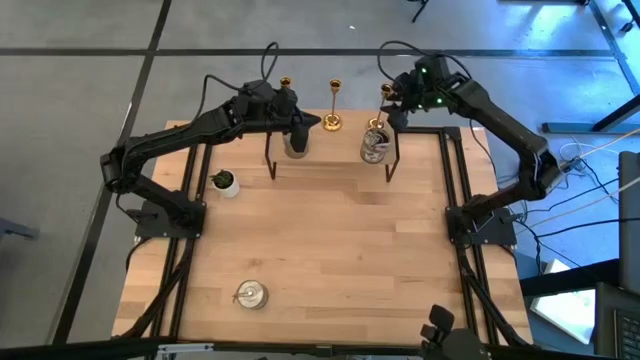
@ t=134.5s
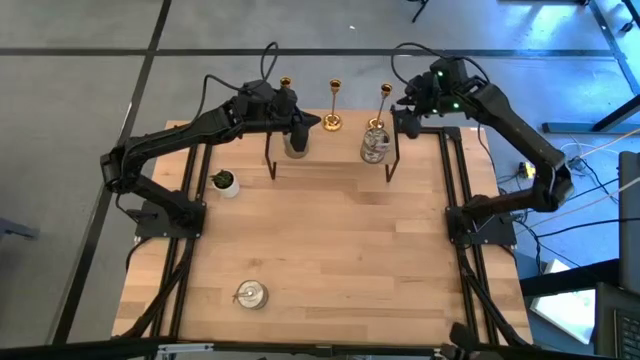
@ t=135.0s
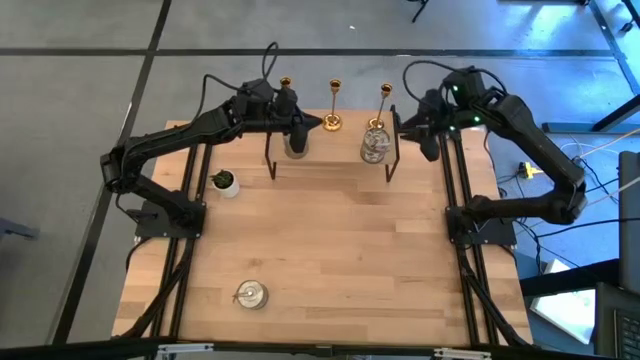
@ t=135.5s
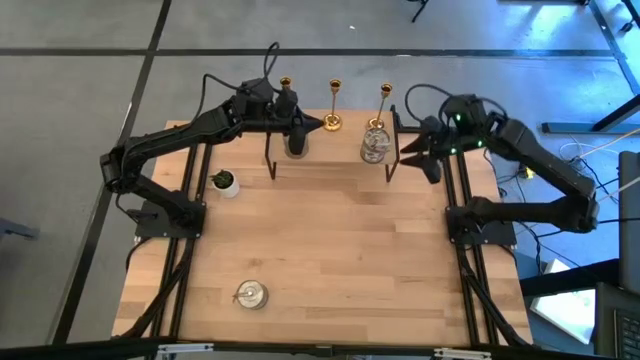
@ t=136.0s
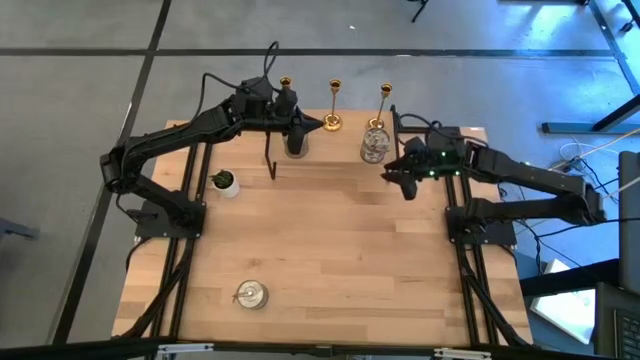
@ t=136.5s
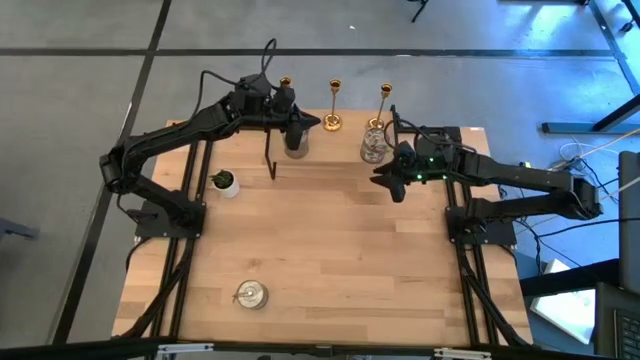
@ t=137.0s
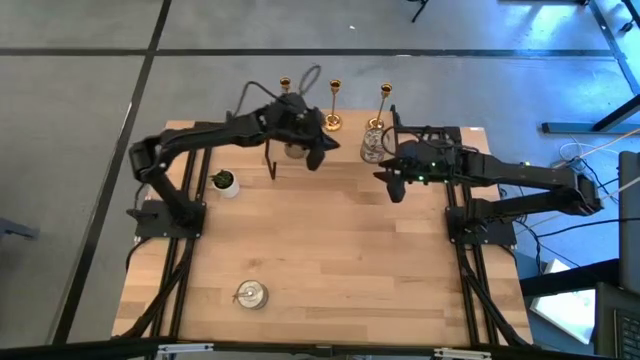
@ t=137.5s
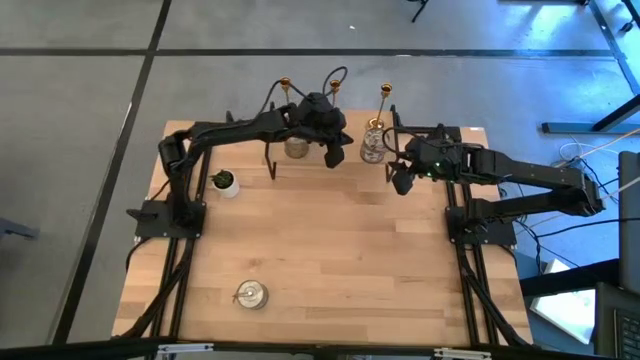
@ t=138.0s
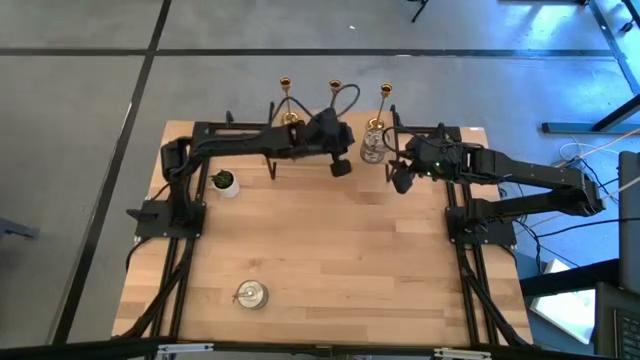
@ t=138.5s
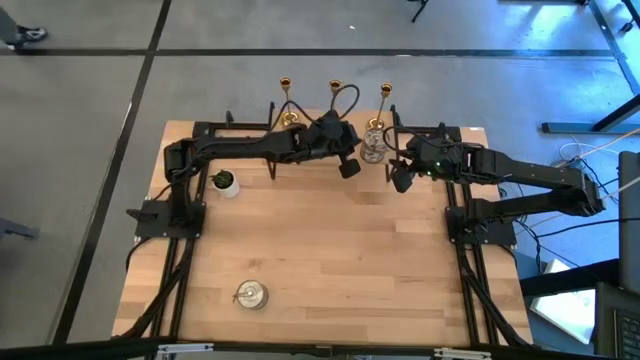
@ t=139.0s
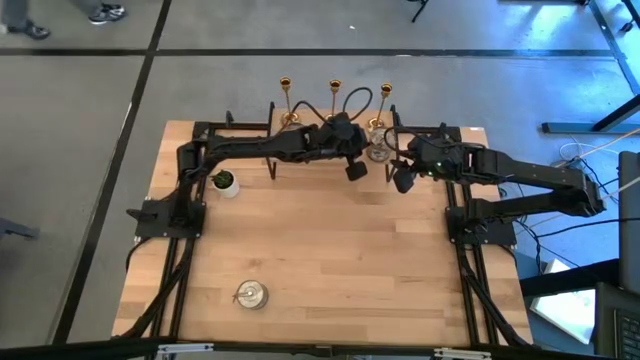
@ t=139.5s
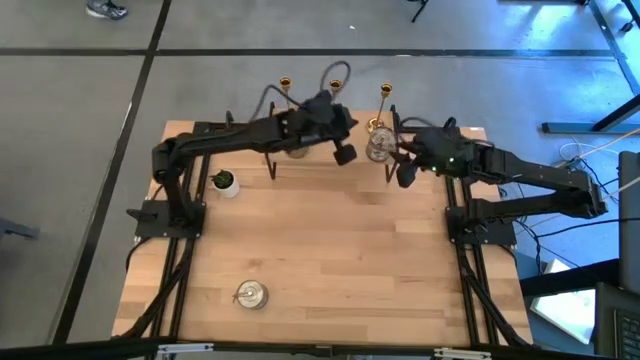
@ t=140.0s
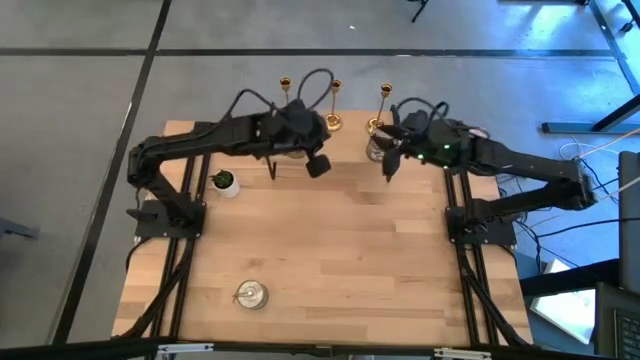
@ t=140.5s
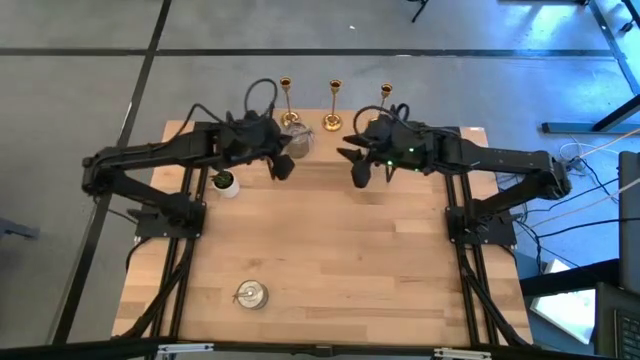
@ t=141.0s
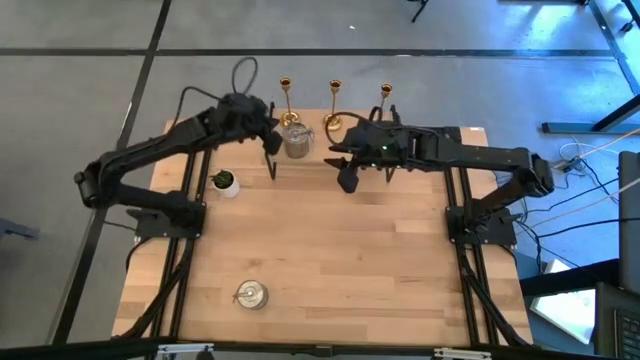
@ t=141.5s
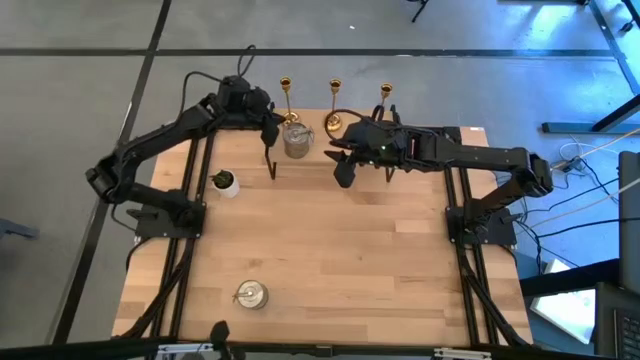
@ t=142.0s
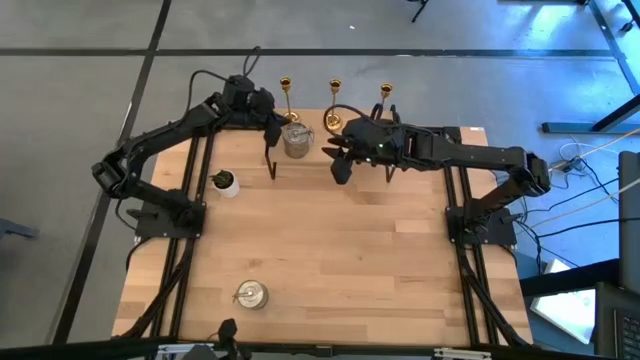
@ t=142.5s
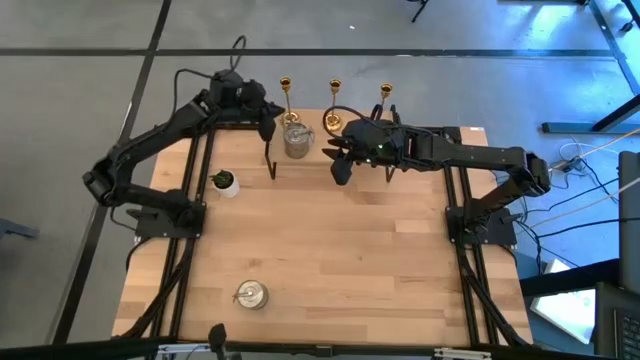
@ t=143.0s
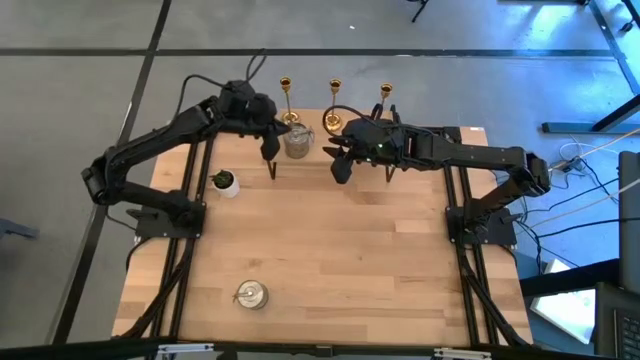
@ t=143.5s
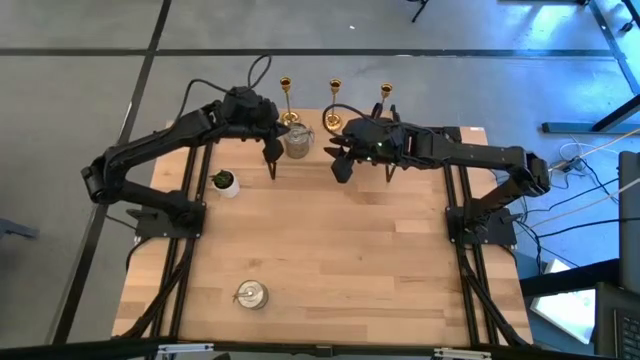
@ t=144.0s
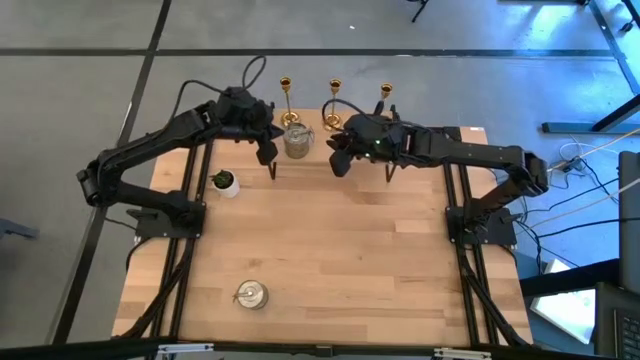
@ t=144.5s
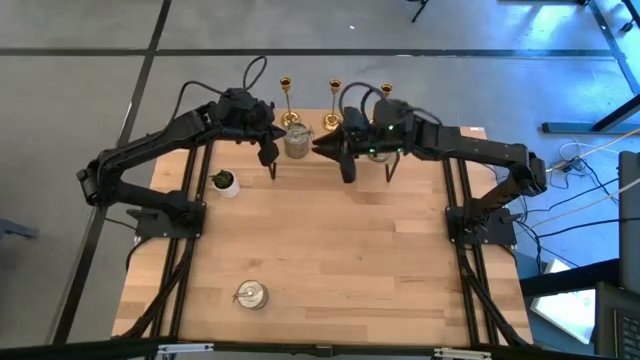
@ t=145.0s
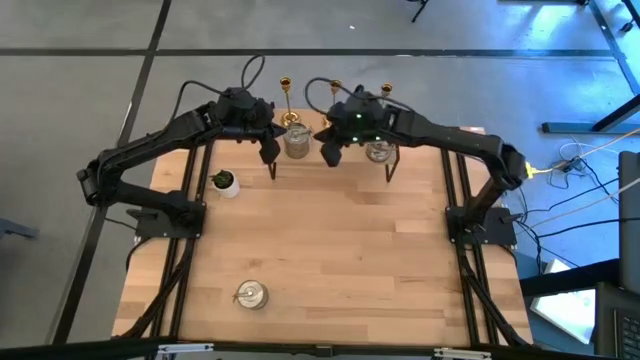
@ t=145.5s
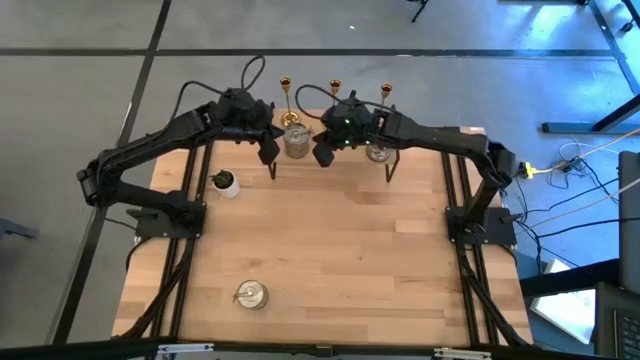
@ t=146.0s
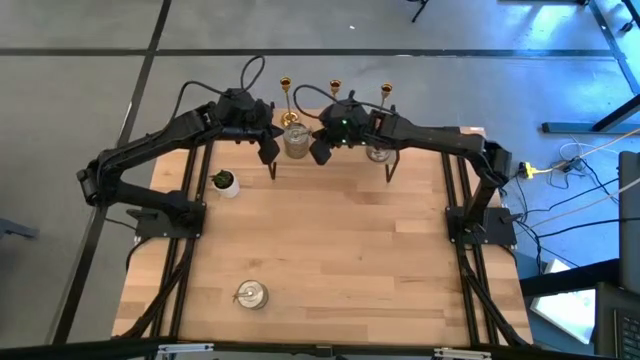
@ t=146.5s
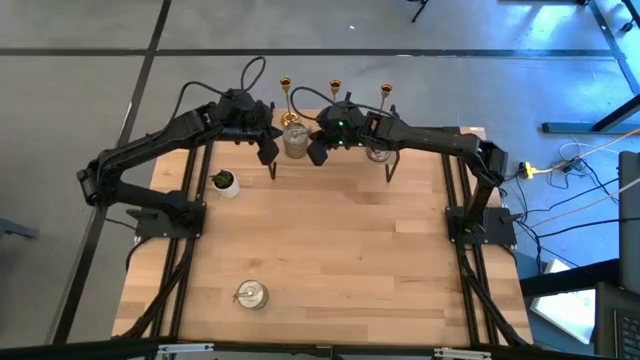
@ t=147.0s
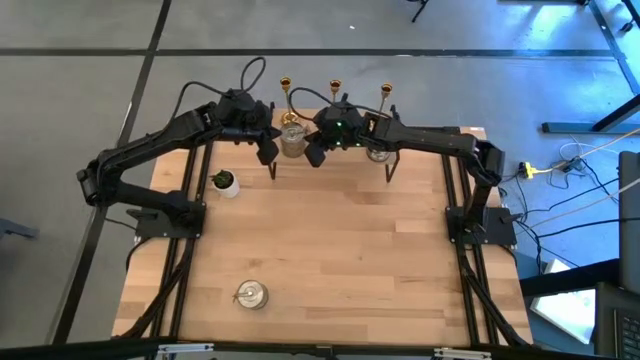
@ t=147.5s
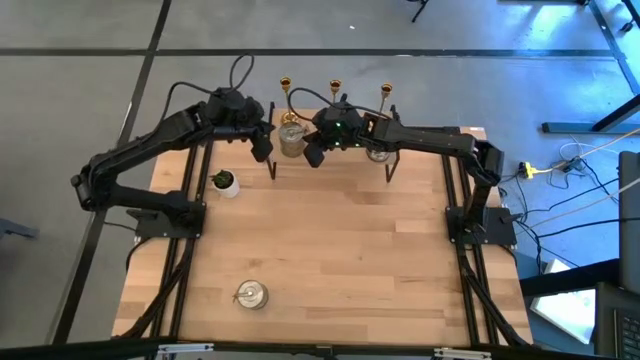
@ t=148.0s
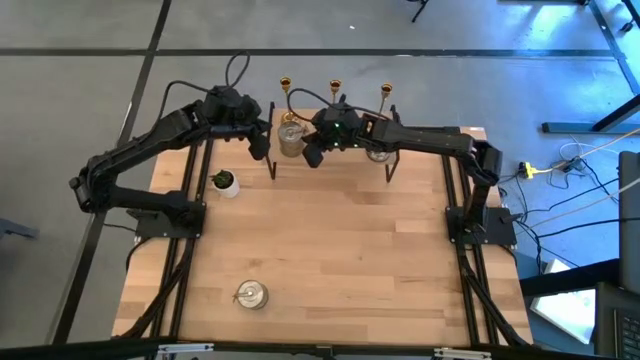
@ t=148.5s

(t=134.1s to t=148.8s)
Task: Pick & Place candle stick holders
Adjust the silver scented candles on the shelf

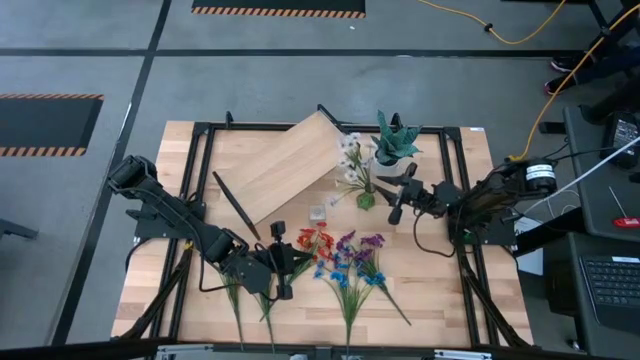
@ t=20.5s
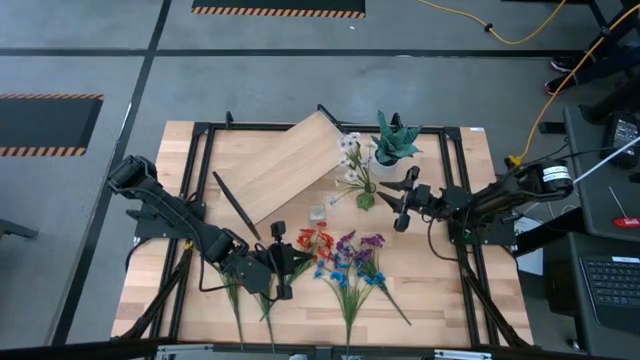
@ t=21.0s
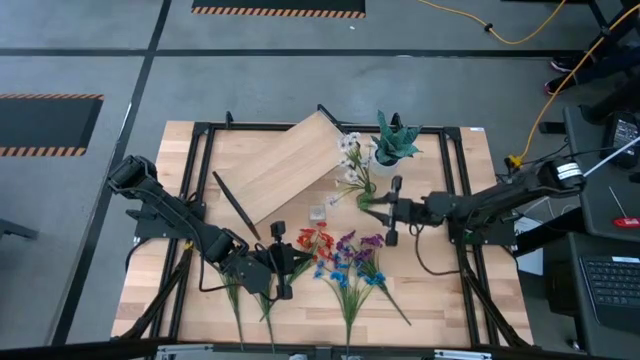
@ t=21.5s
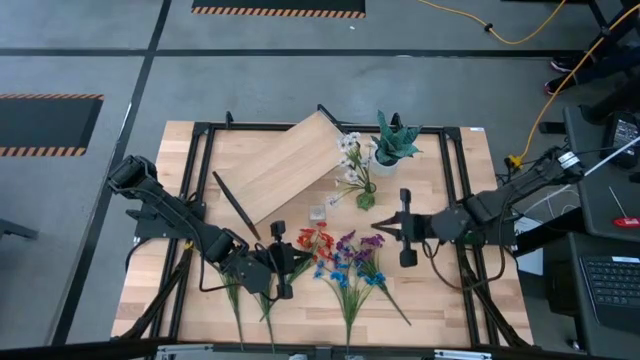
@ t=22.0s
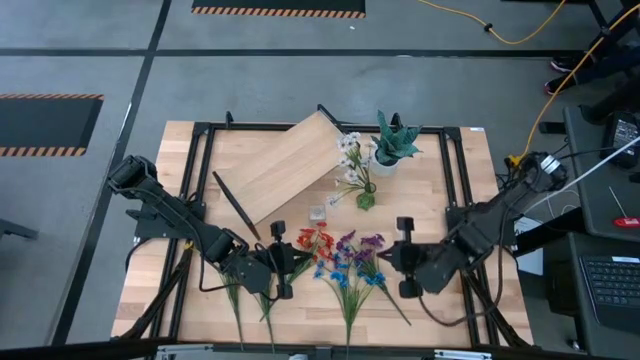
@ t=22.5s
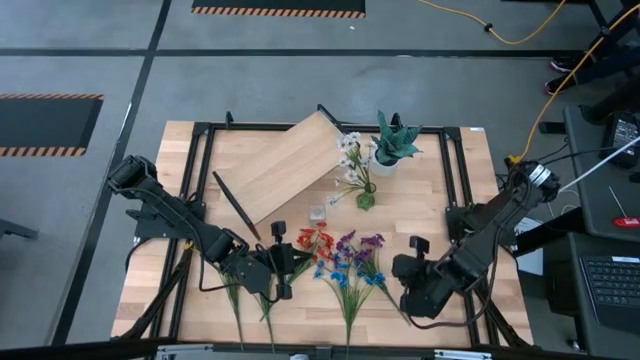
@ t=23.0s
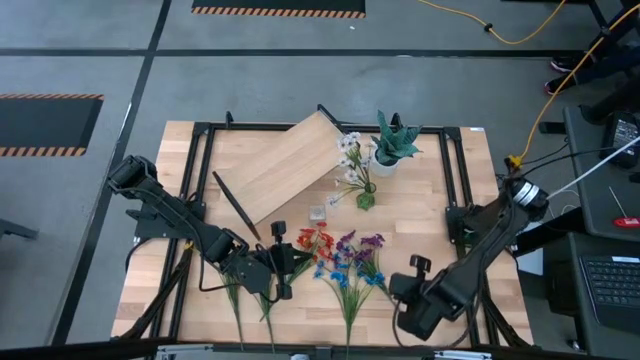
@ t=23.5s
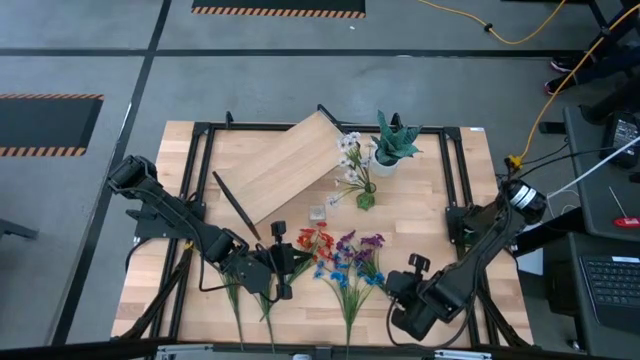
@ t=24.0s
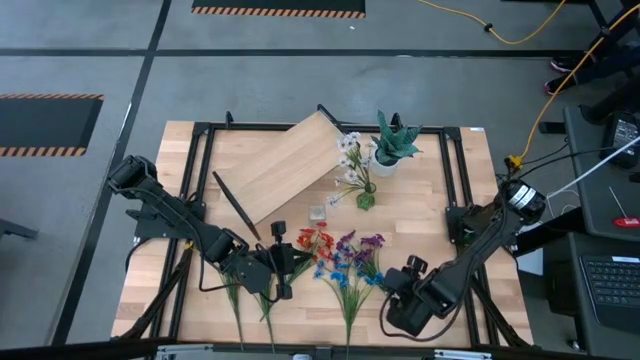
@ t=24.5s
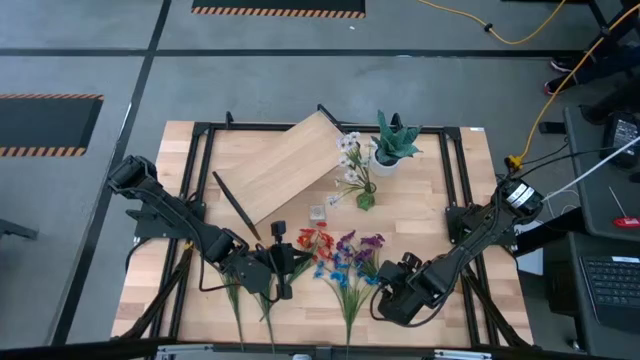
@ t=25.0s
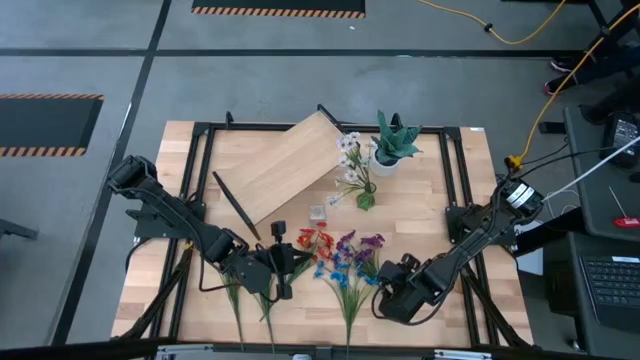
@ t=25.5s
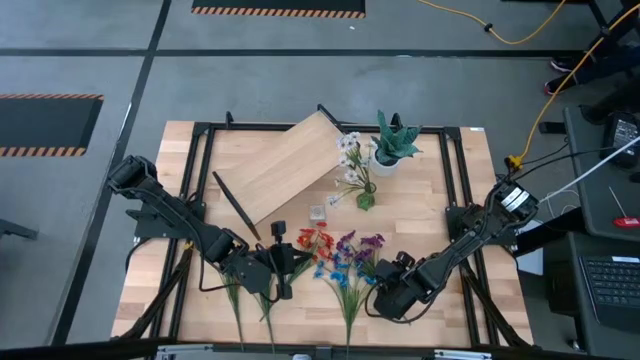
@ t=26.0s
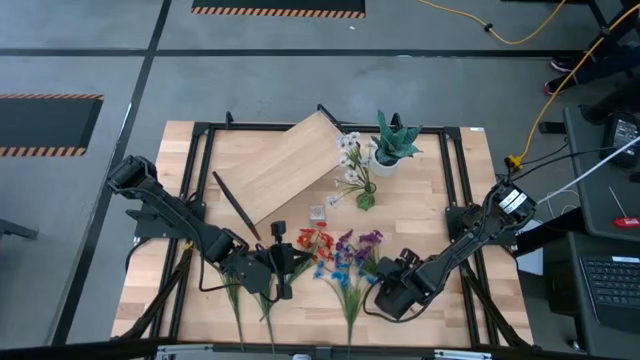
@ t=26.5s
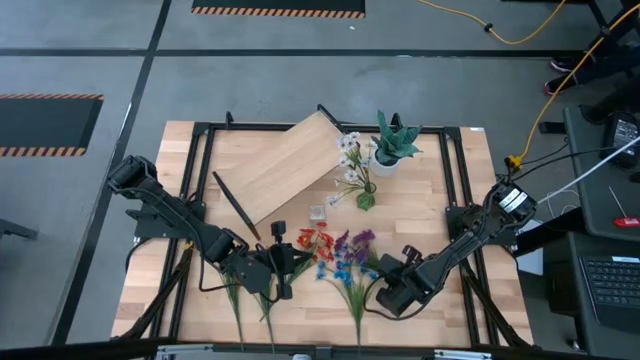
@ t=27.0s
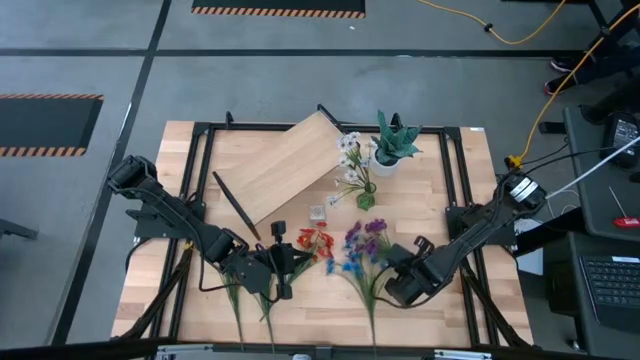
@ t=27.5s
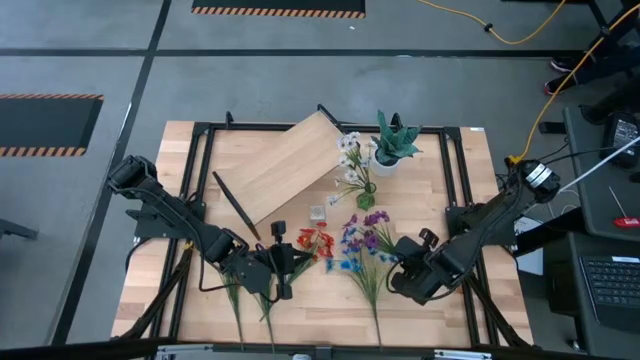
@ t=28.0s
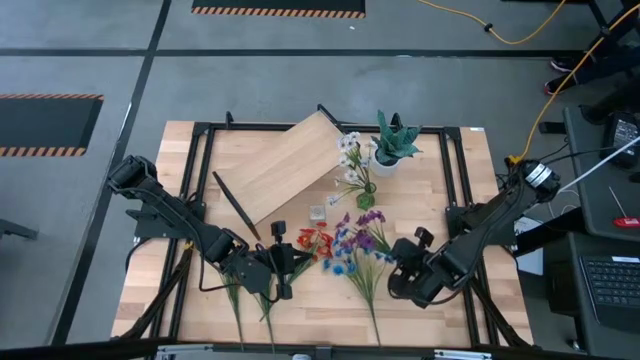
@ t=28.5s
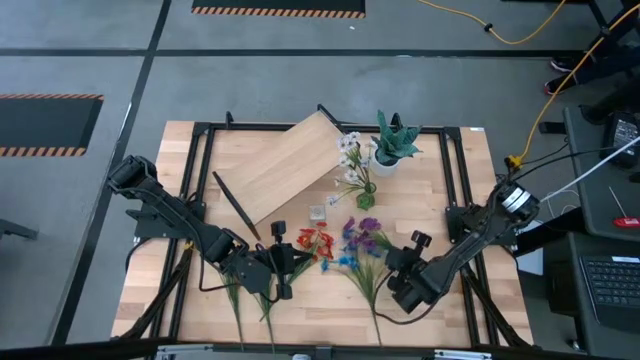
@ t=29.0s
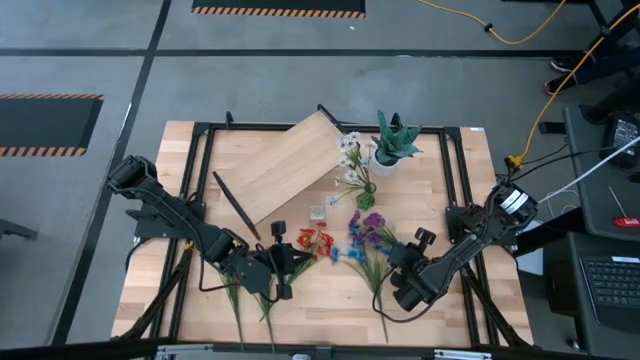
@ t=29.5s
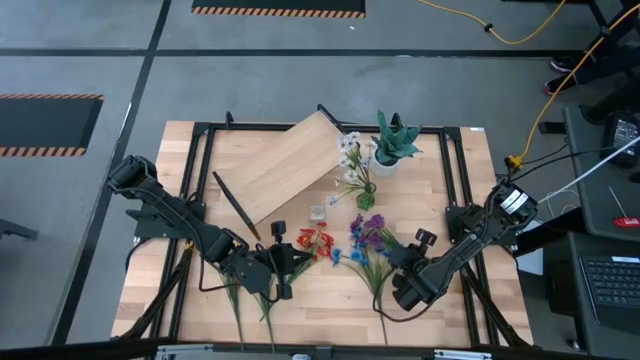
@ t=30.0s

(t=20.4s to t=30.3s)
Task: Pick and place flowers into a vace then onto a shelf
Adjust the purple flowers
